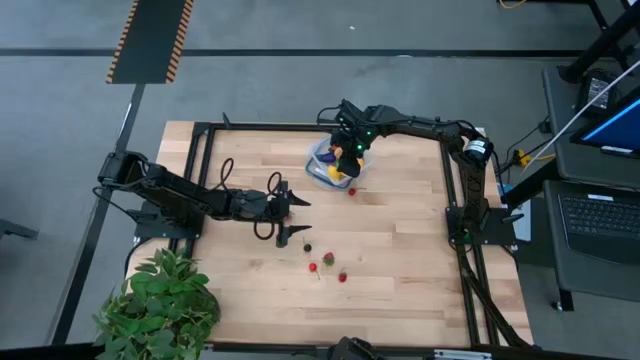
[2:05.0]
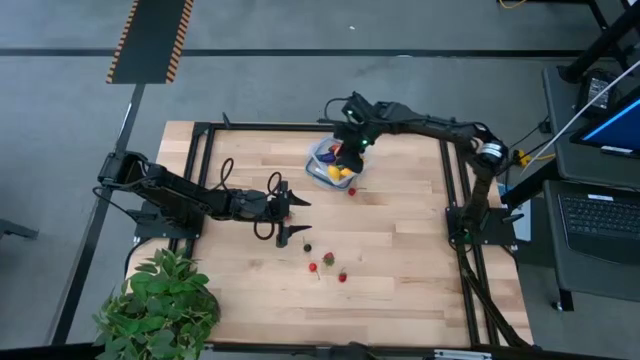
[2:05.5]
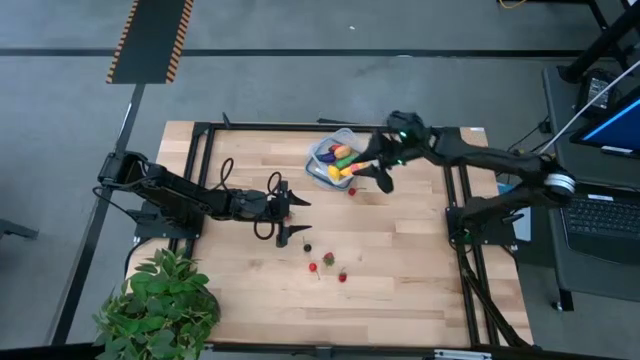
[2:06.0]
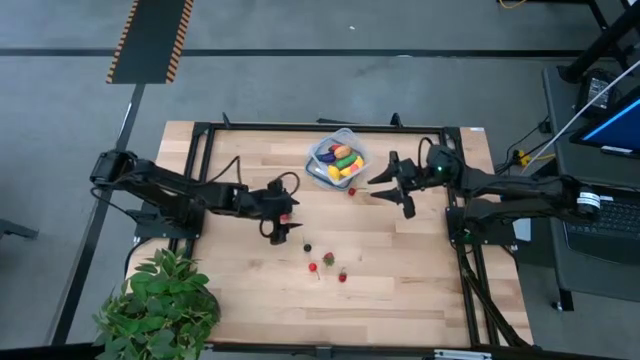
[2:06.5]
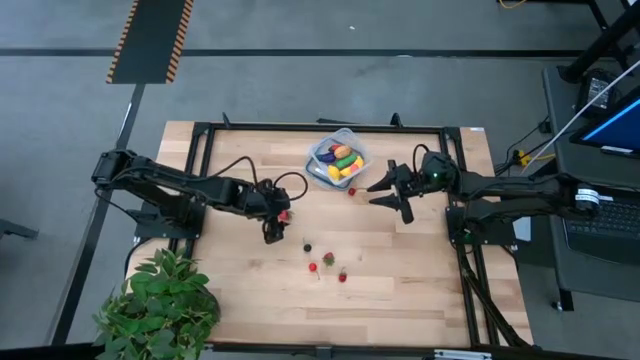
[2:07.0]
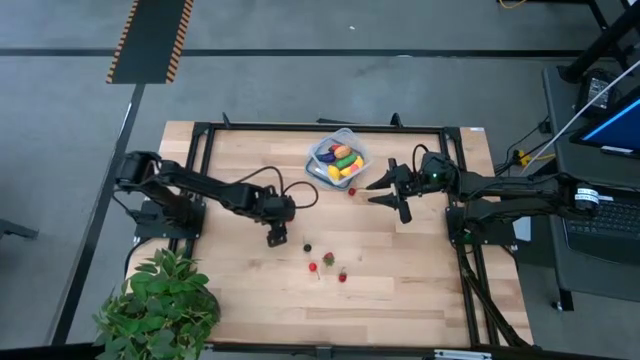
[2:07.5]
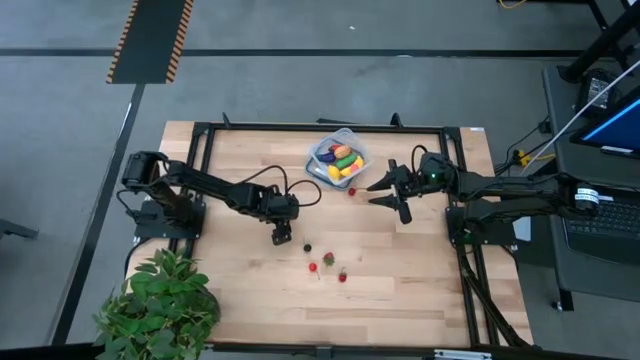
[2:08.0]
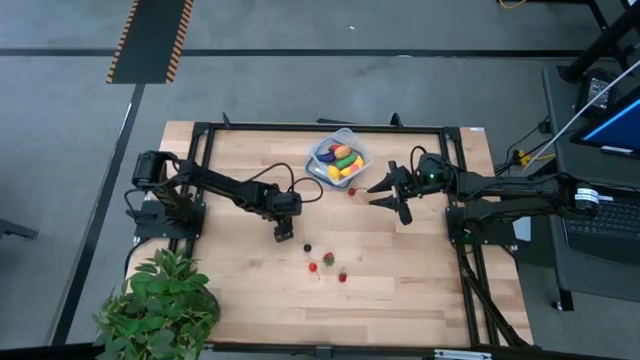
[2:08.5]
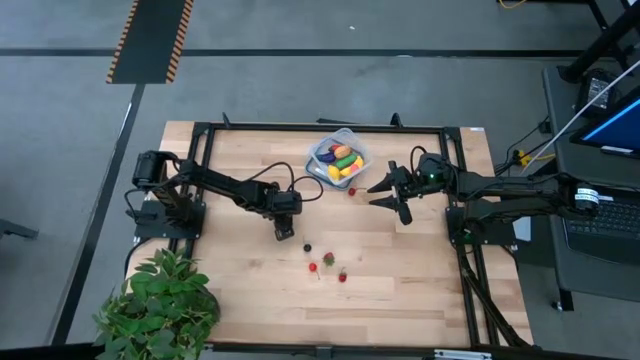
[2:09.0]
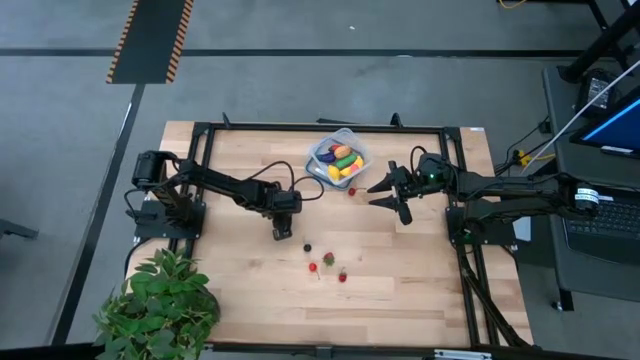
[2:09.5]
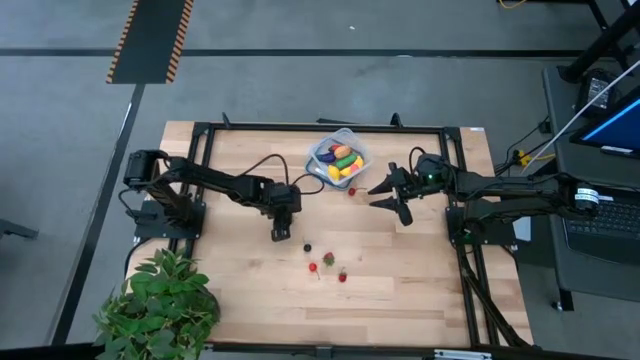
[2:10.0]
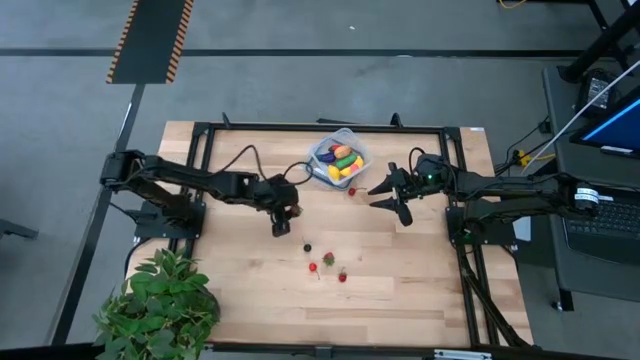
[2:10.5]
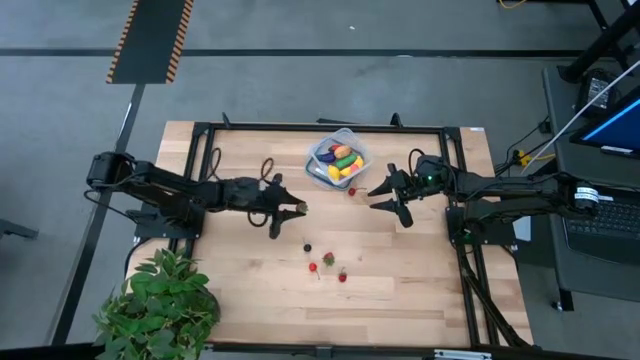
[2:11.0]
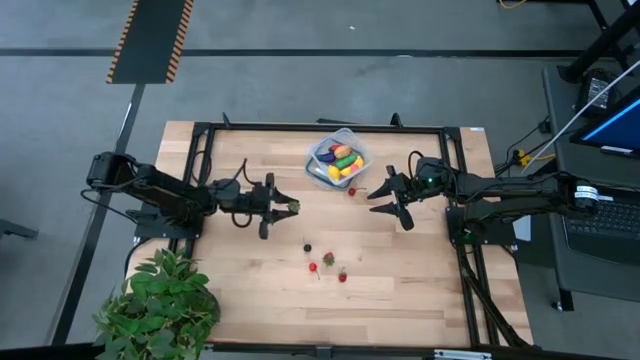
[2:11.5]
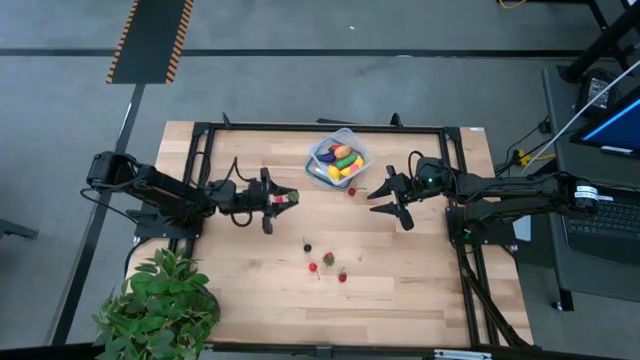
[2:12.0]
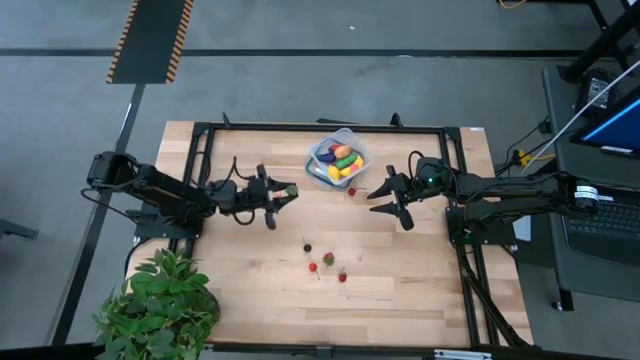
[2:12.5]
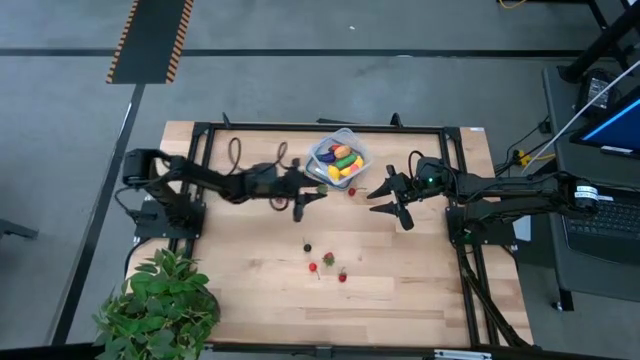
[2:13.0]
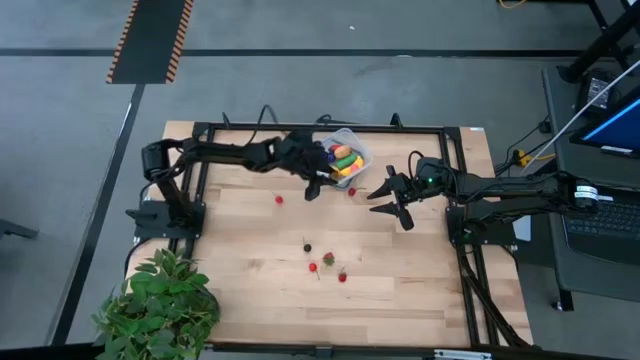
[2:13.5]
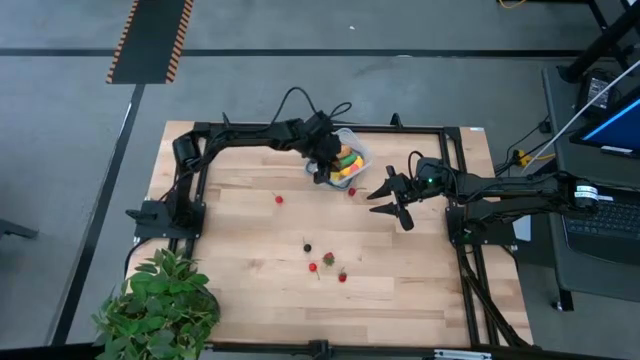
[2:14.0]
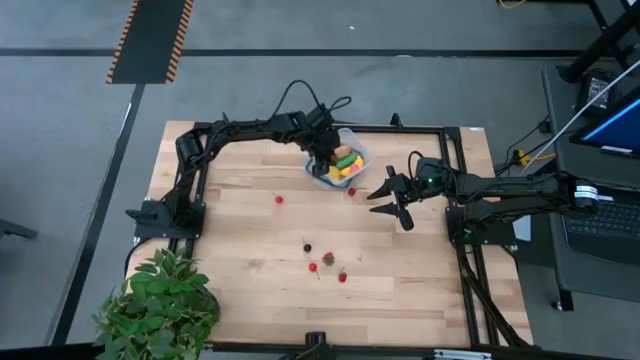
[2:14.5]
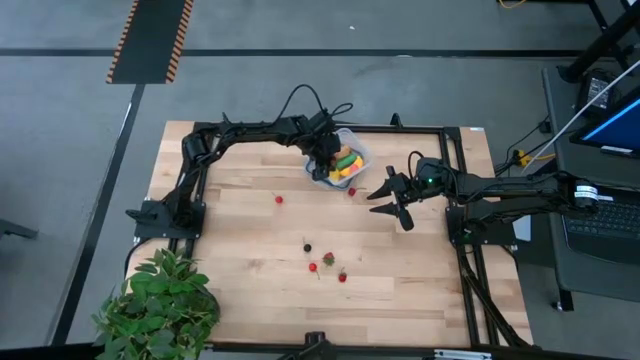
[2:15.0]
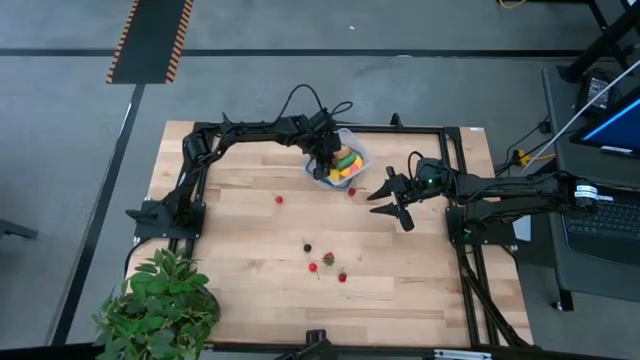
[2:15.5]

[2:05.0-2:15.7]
Task: Pick and placing Produce into tupperware
Put the top red strawberry into the transparent container

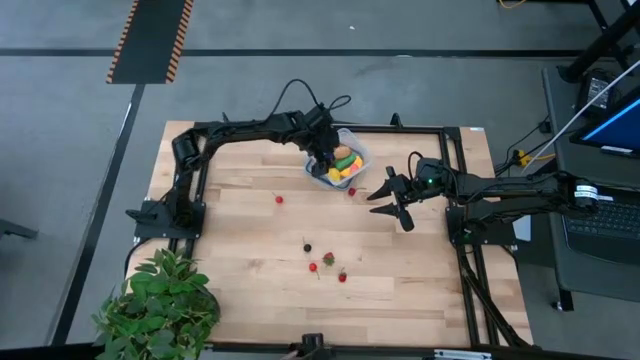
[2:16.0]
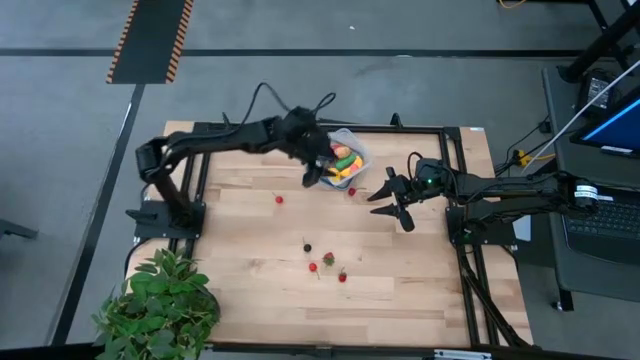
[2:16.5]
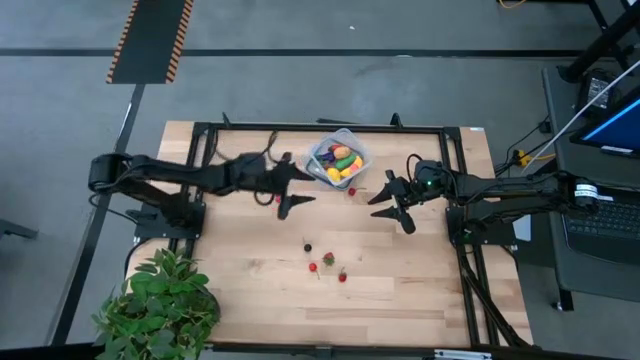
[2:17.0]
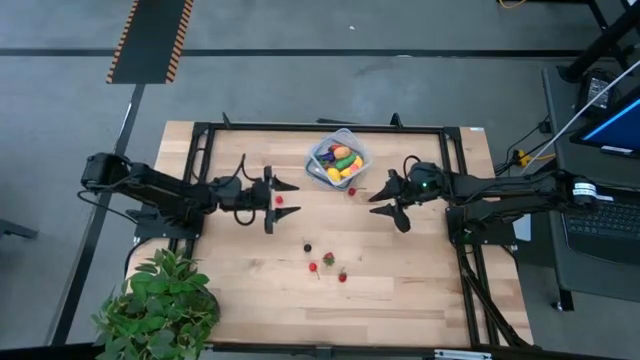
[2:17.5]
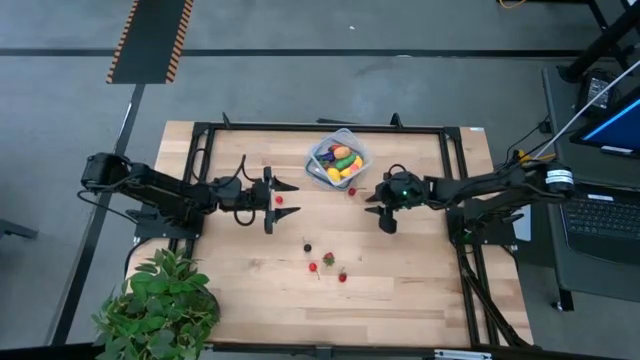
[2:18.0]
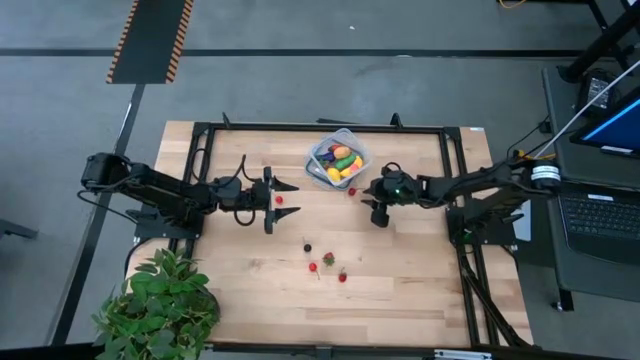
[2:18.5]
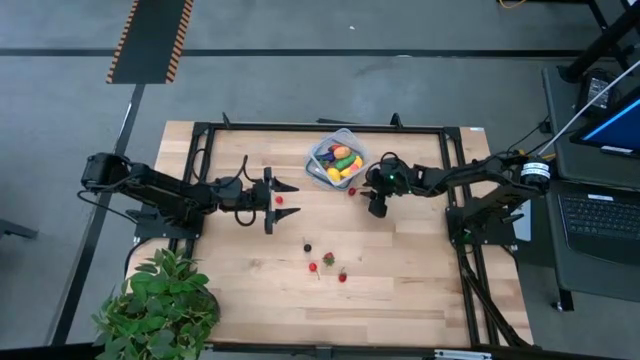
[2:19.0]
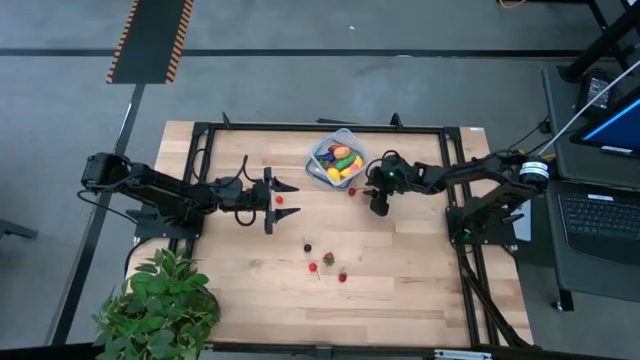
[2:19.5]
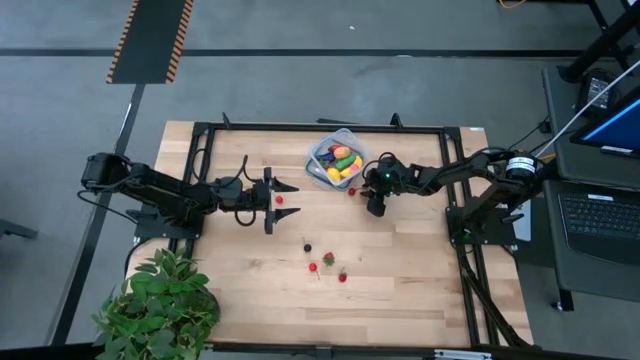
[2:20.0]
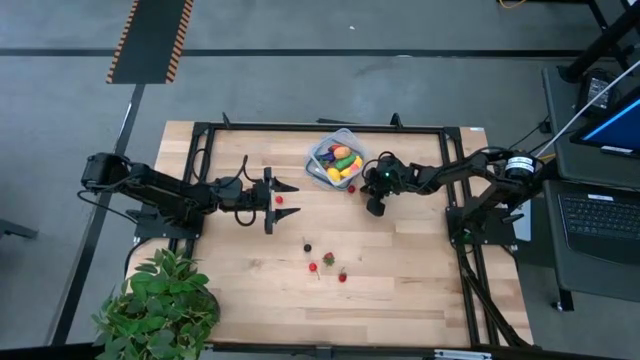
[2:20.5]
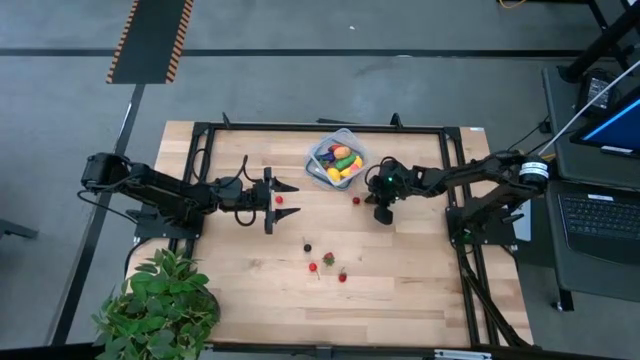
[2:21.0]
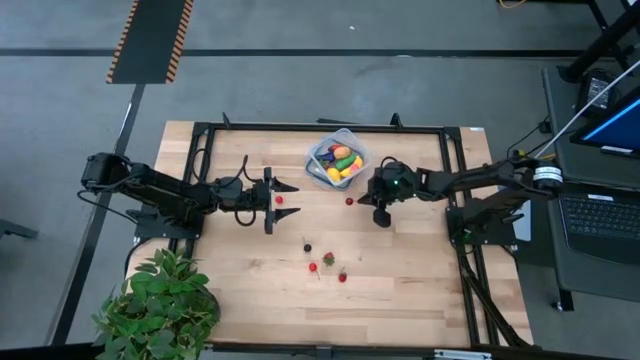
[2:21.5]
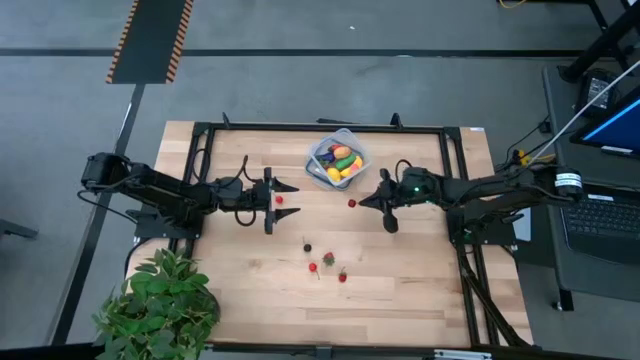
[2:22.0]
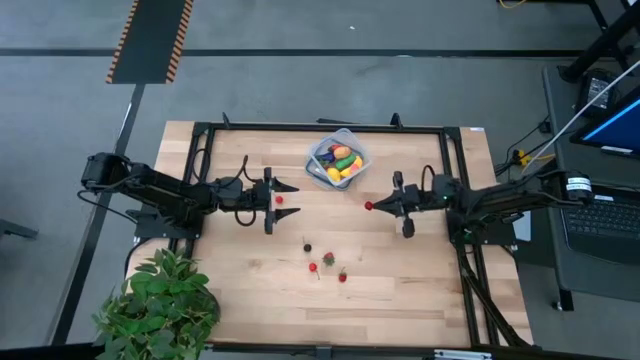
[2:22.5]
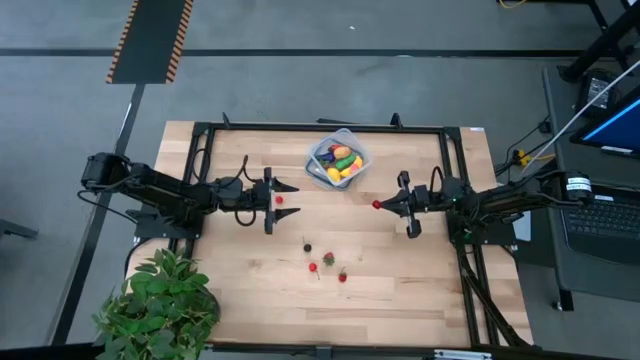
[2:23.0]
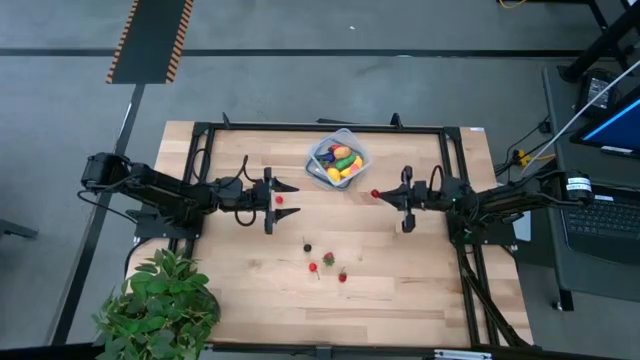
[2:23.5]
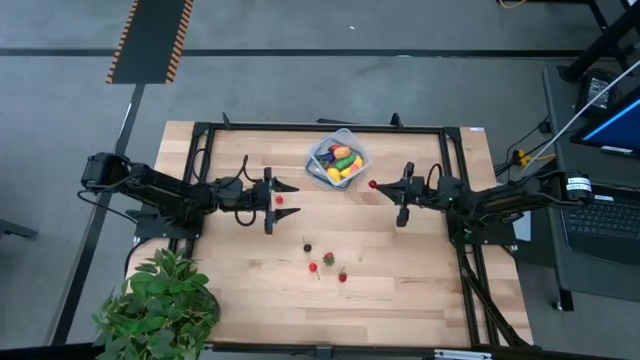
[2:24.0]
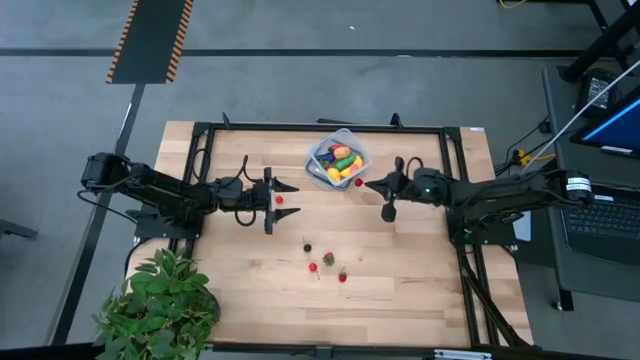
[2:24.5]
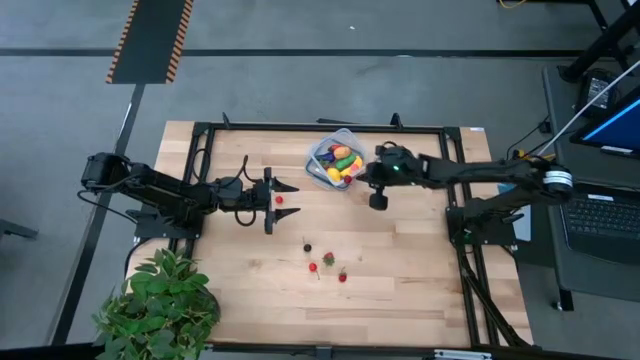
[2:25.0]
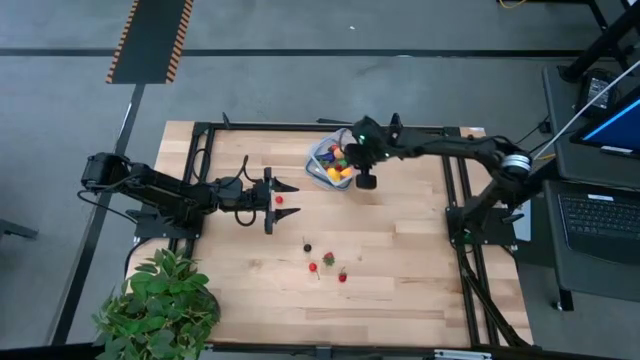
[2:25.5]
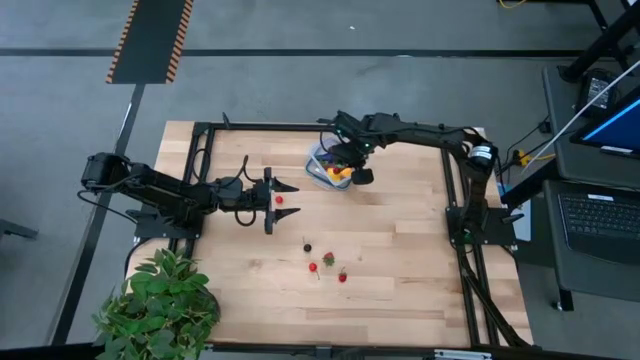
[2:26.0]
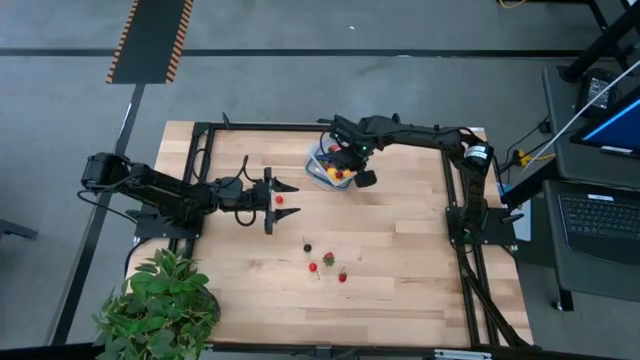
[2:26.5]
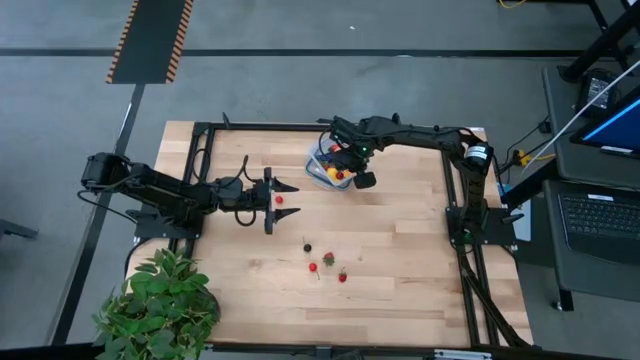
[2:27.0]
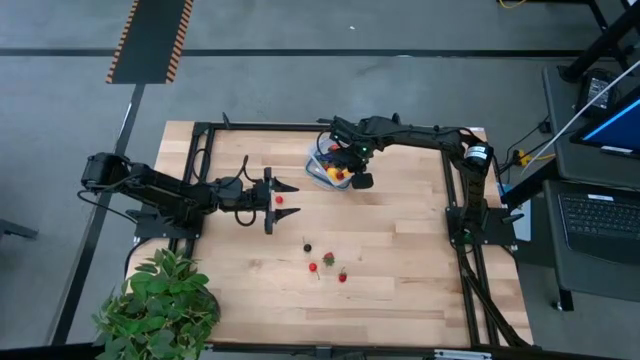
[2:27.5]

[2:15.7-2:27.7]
Put the top right red cherry into the transparent container
